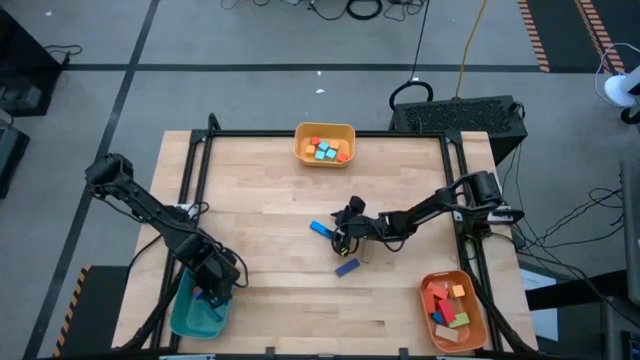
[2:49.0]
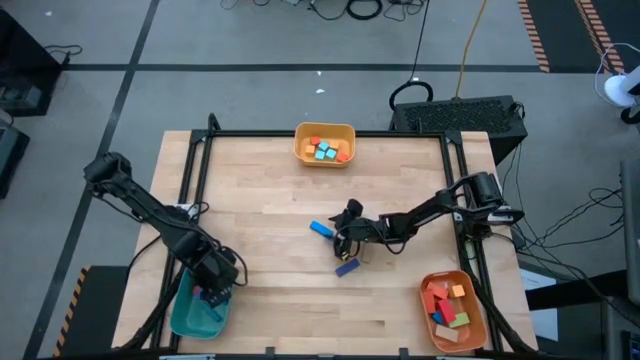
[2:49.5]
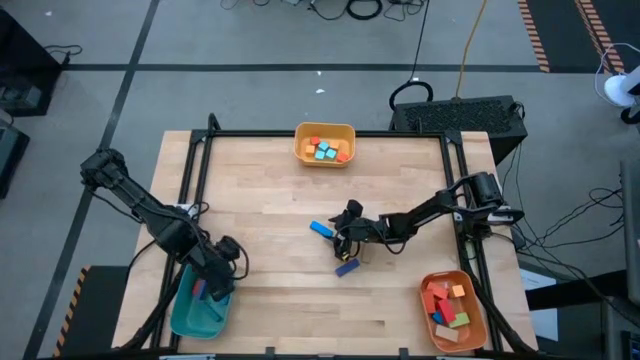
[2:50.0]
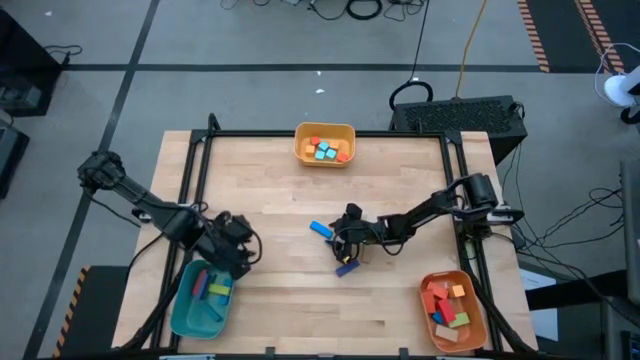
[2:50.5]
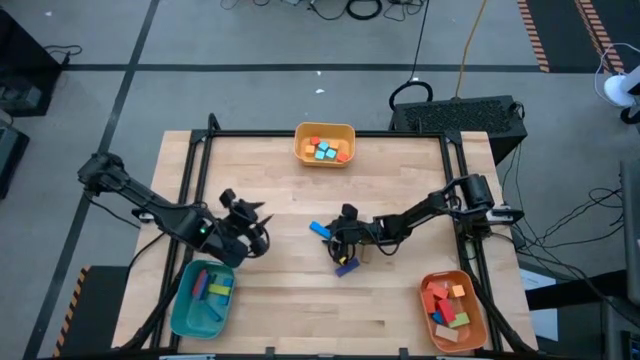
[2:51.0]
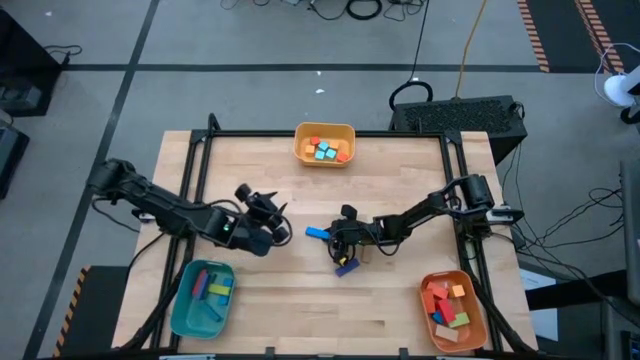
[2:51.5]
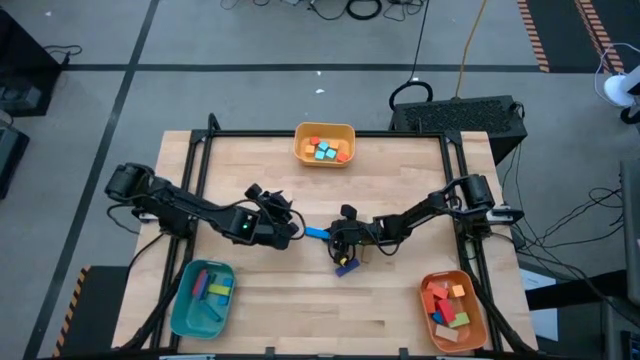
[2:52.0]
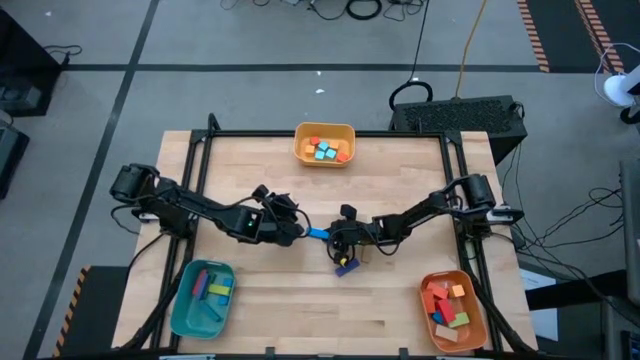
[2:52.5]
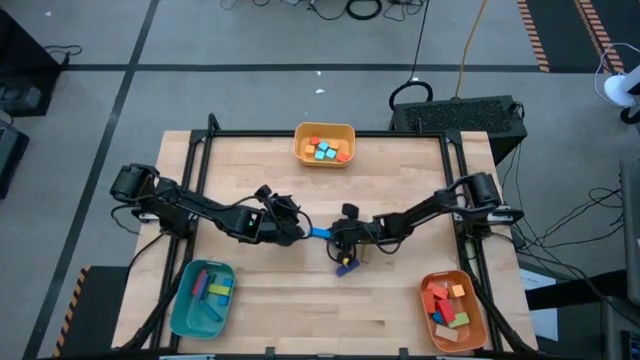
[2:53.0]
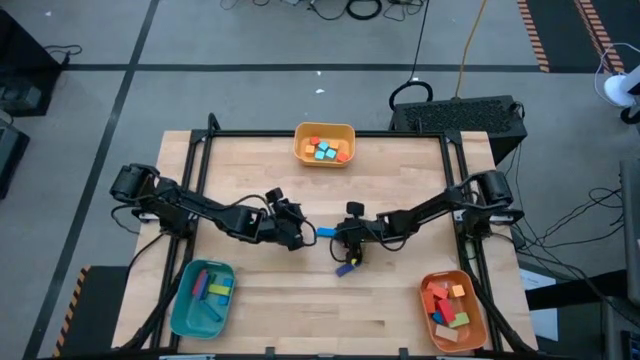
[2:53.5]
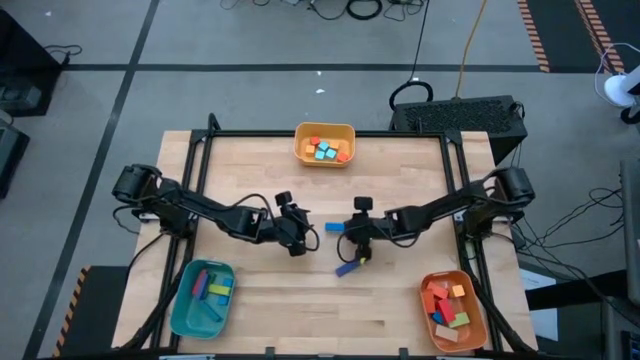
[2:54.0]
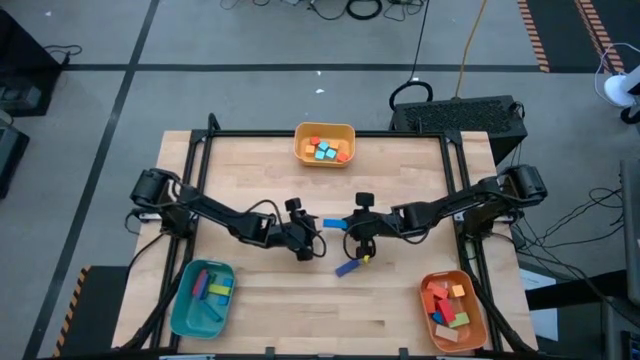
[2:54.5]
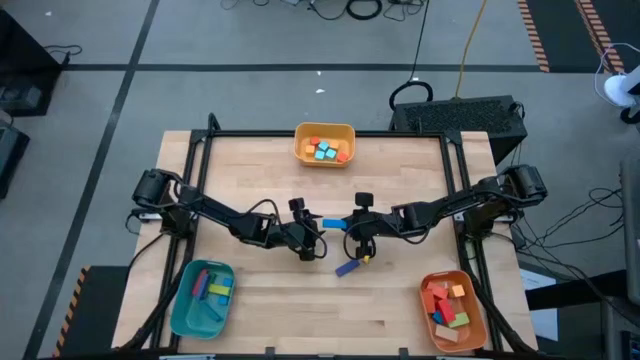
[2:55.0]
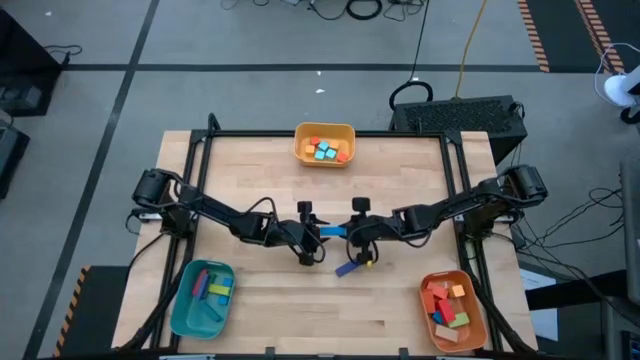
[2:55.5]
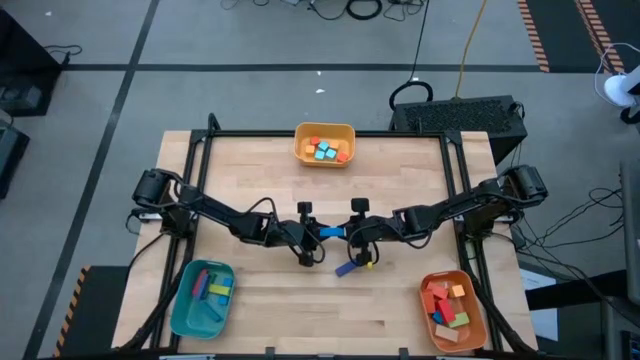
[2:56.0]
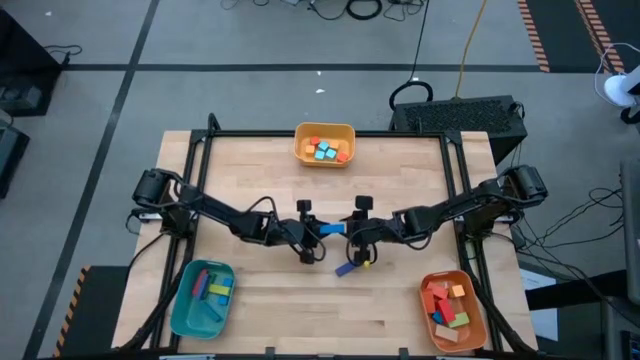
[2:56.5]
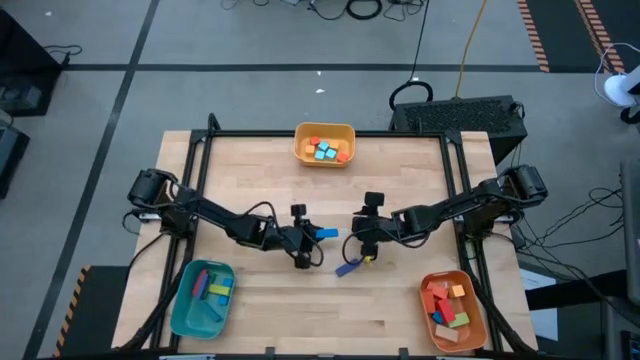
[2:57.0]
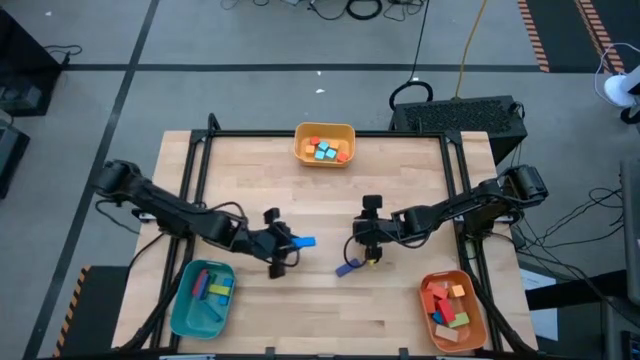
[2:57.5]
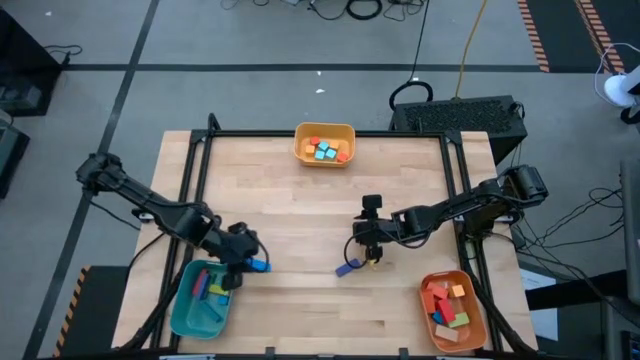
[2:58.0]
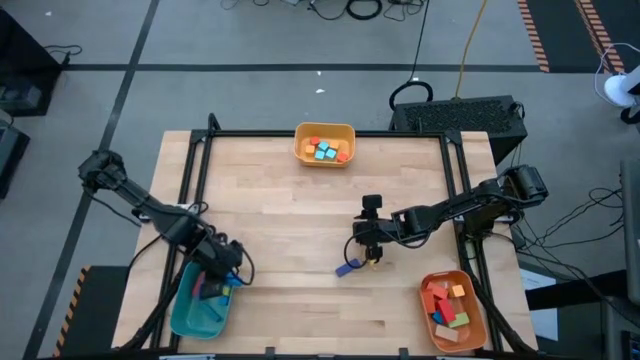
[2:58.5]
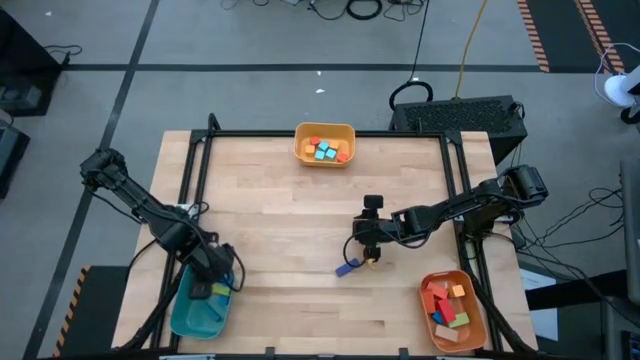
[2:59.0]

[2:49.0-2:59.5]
Task: Sort blocks by size
Put the small blue rectangle block into the green bin

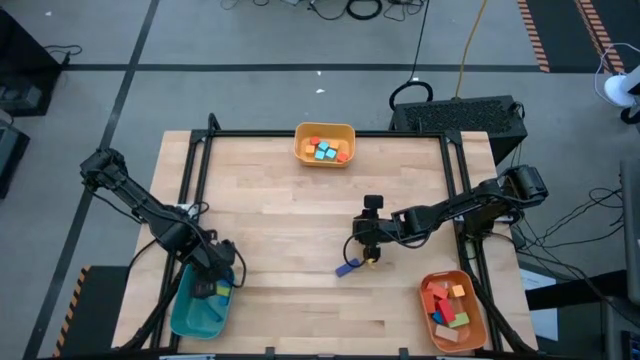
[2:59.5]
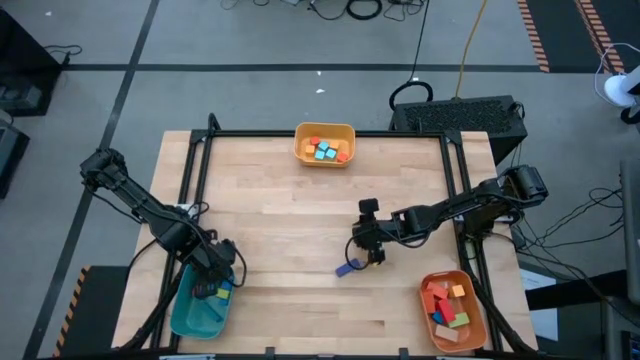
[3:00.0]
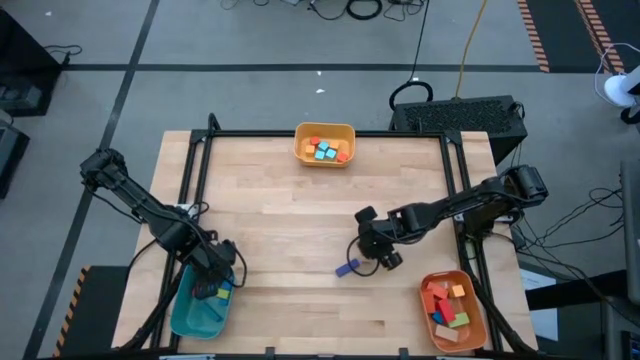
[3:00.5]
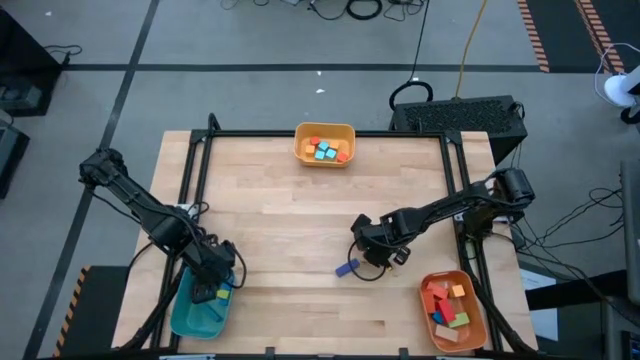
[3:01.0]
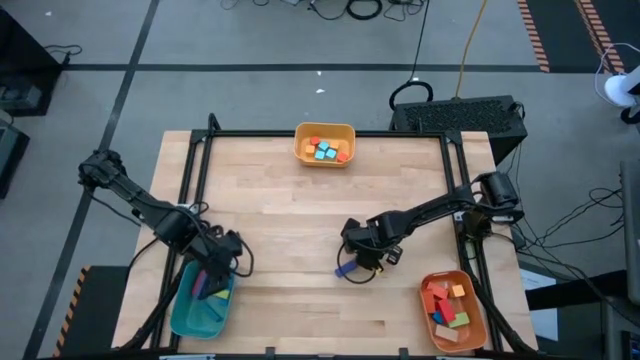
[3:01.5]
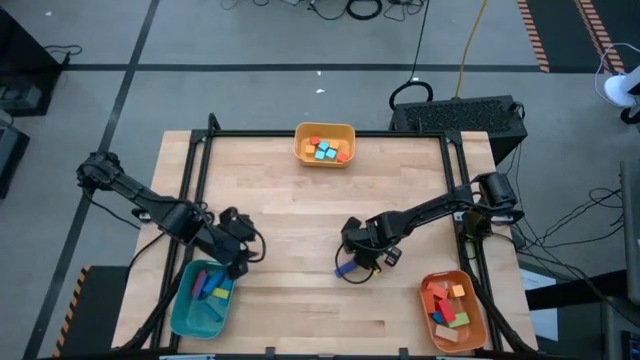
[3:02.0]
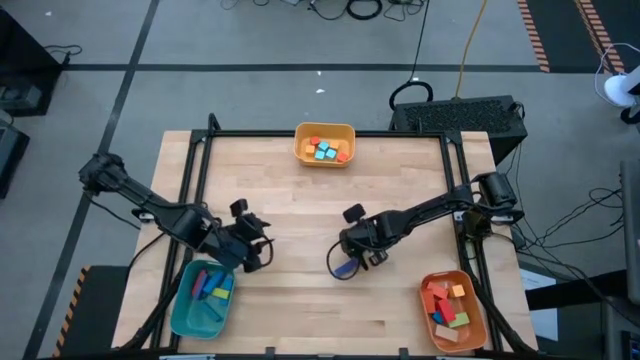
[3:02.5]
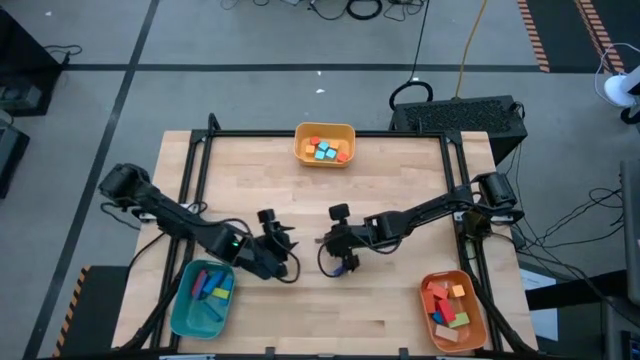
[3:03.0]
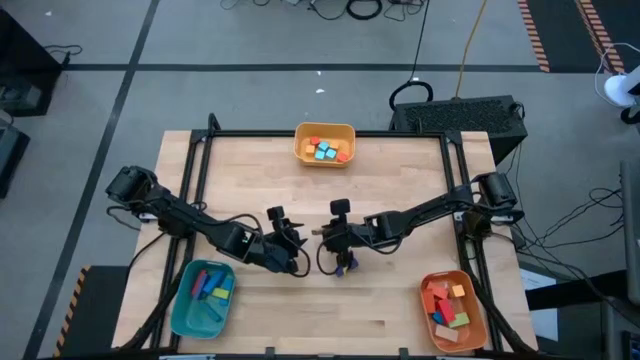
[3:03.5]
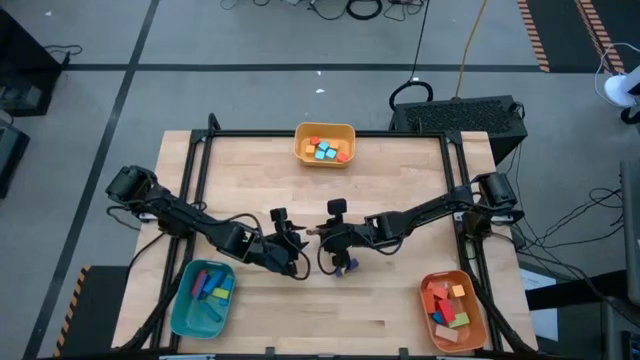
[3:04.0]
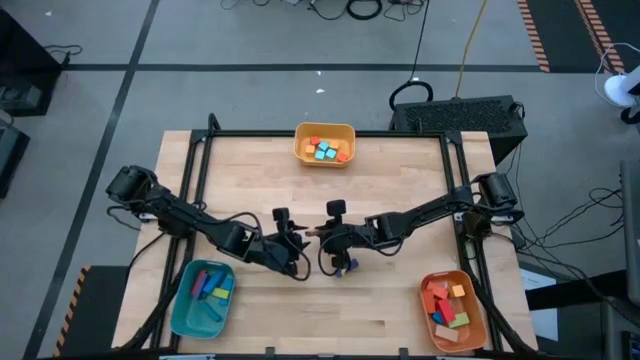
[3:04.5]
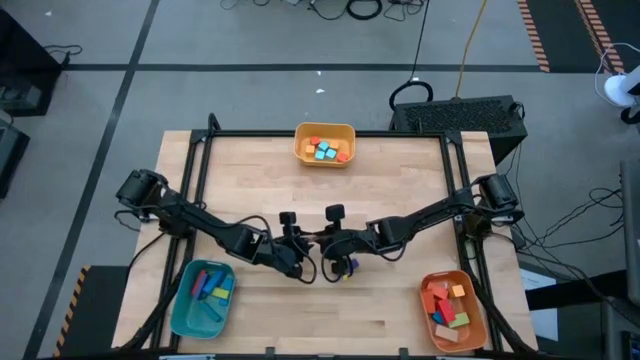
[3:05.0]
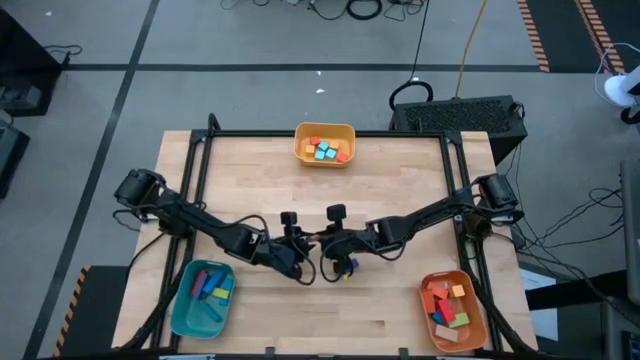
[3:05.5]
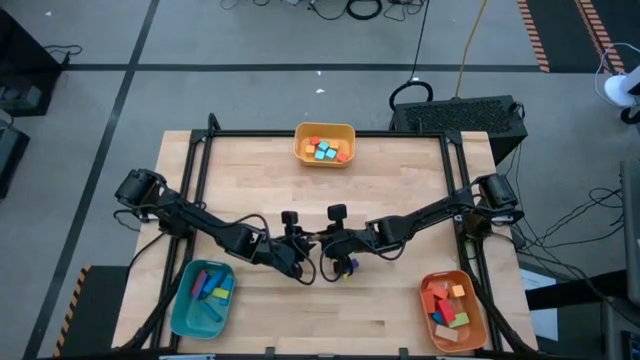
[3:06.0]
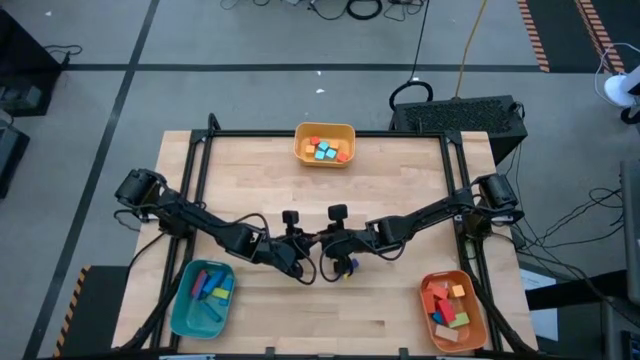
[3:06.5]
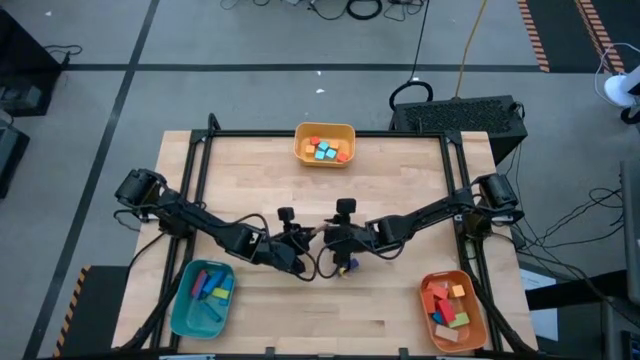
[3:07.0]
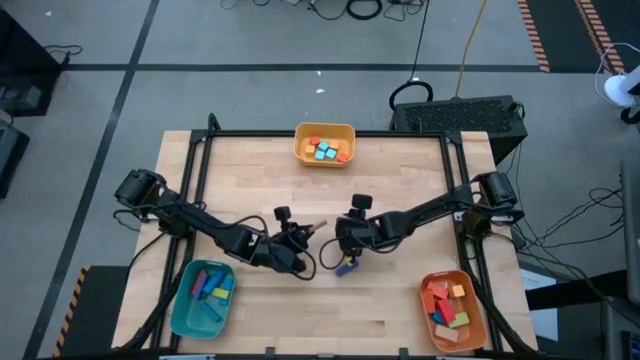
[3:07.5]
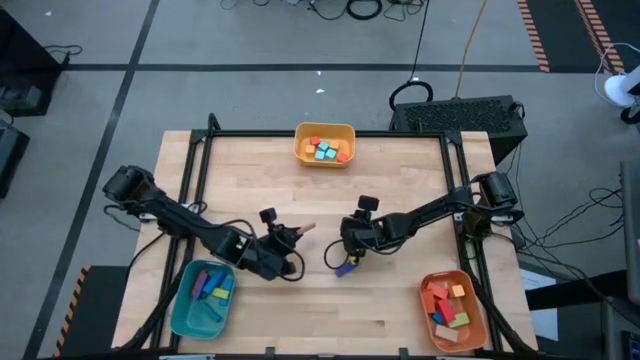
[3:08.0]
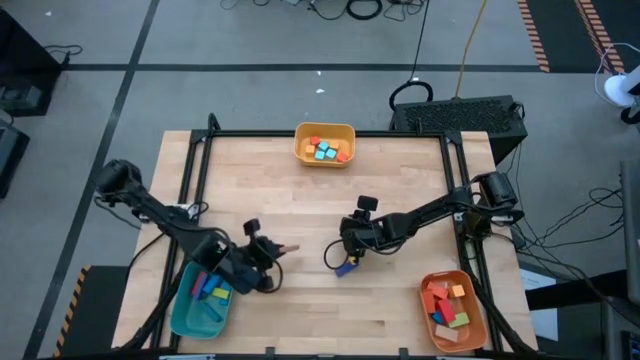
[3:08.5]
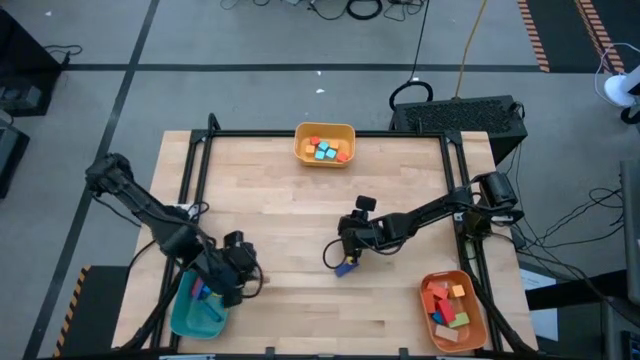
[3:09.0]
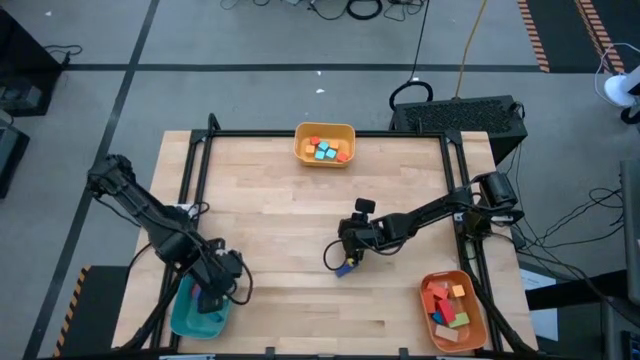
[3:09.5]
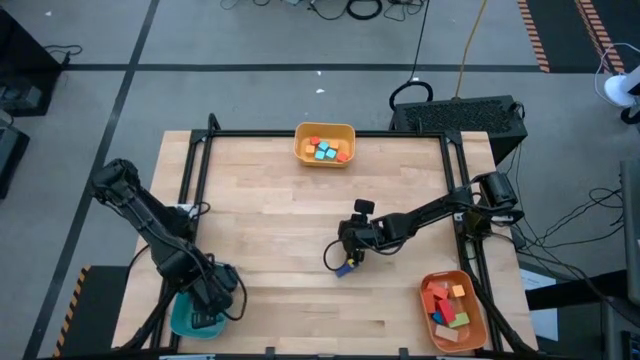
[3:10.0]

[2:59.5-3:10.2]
Put the small brown rectangle block into the green bin
